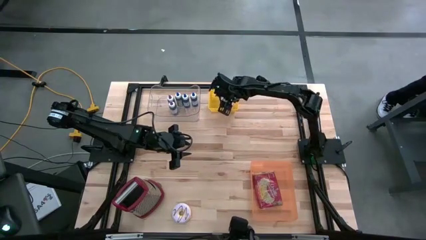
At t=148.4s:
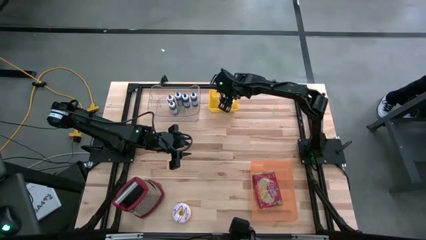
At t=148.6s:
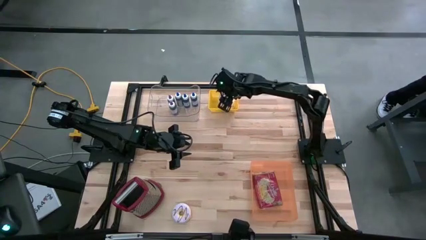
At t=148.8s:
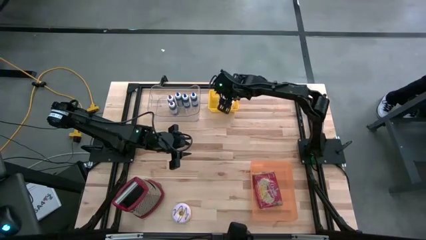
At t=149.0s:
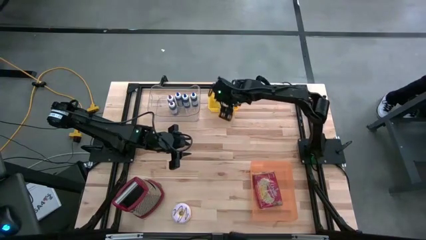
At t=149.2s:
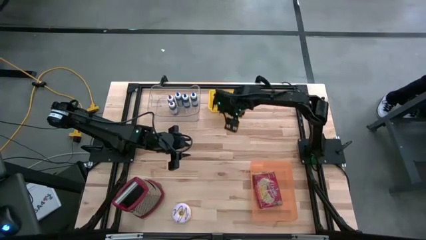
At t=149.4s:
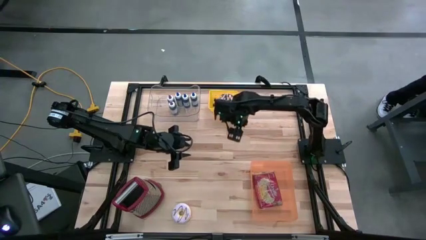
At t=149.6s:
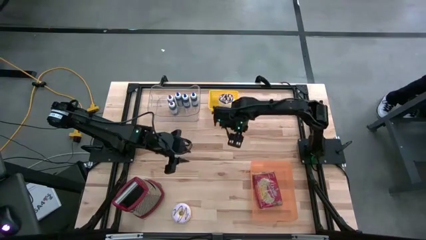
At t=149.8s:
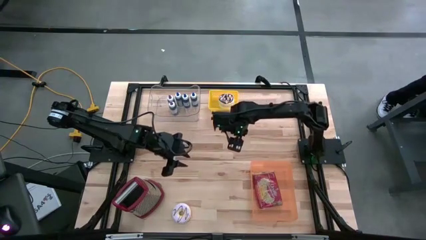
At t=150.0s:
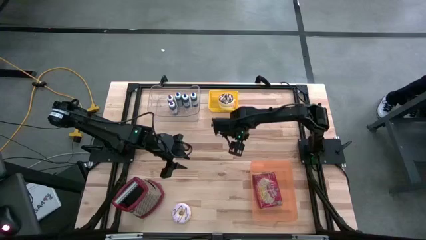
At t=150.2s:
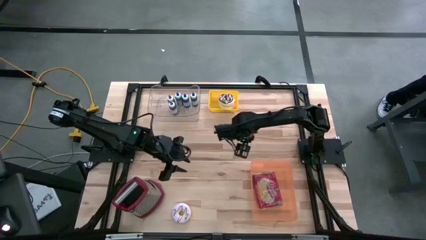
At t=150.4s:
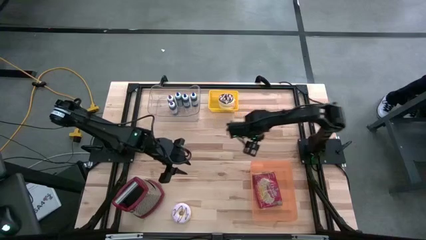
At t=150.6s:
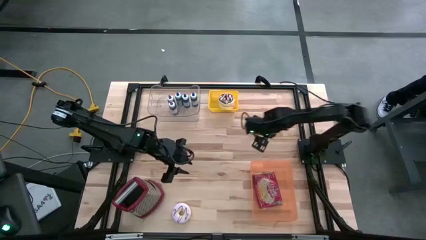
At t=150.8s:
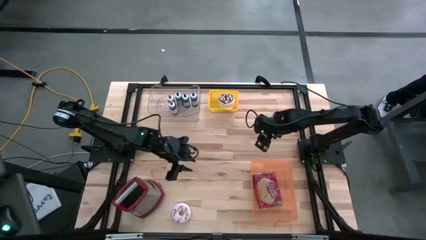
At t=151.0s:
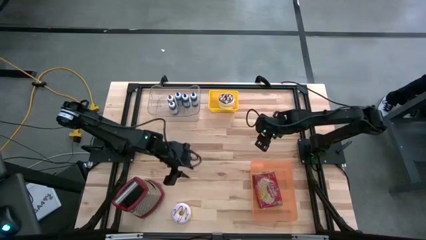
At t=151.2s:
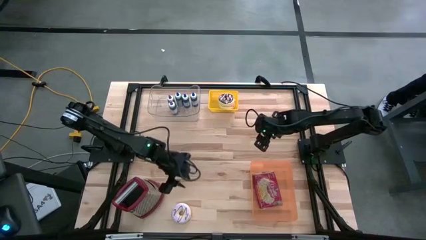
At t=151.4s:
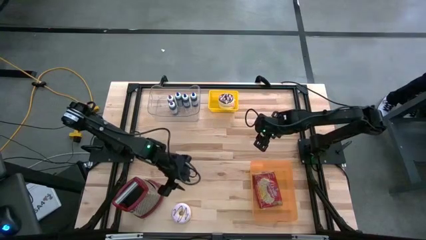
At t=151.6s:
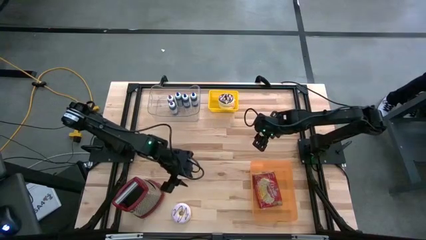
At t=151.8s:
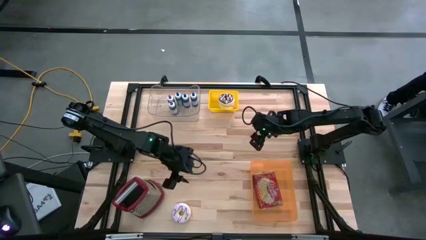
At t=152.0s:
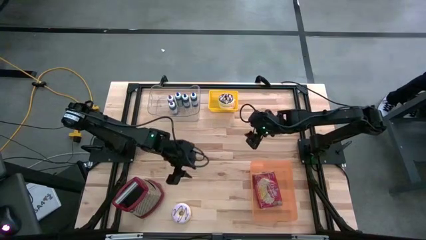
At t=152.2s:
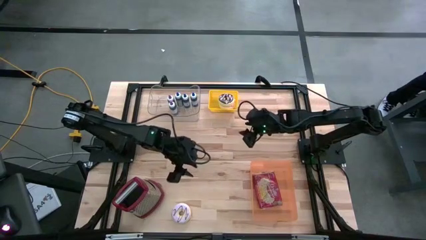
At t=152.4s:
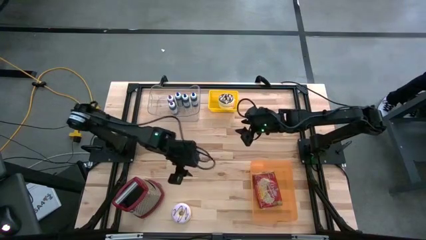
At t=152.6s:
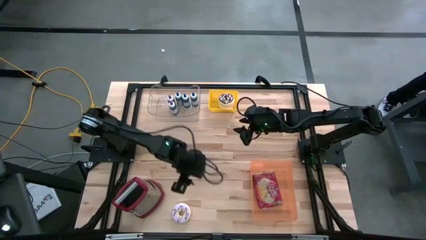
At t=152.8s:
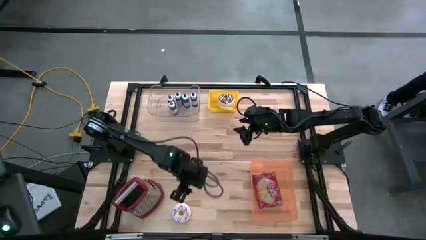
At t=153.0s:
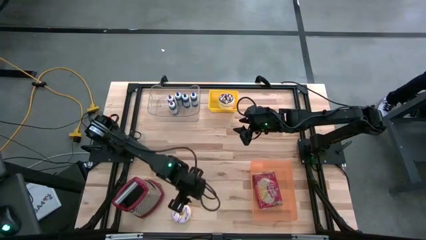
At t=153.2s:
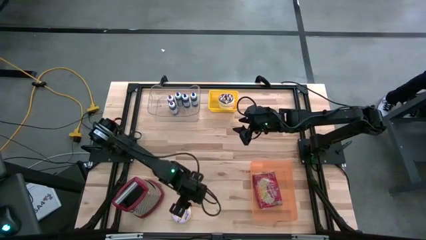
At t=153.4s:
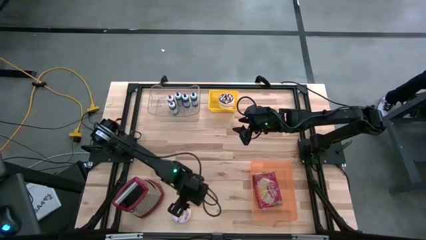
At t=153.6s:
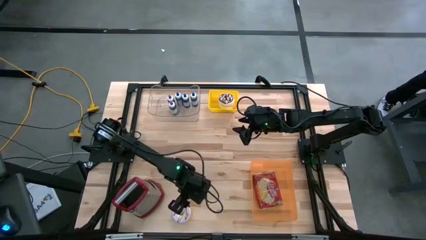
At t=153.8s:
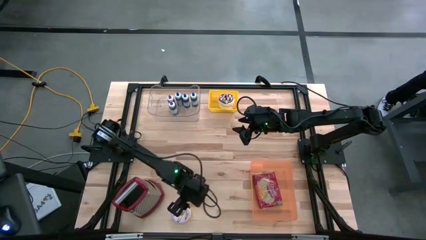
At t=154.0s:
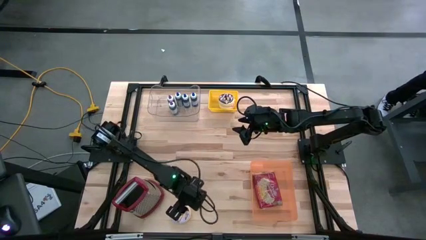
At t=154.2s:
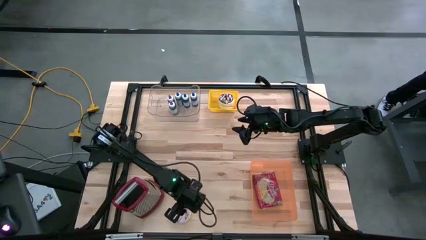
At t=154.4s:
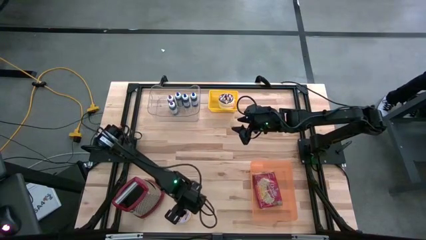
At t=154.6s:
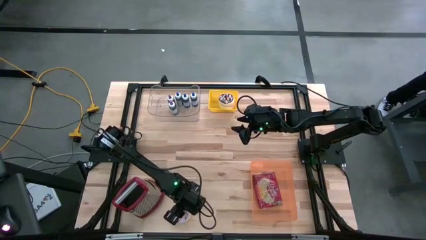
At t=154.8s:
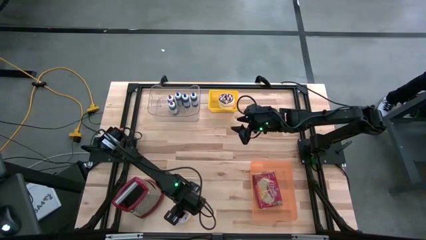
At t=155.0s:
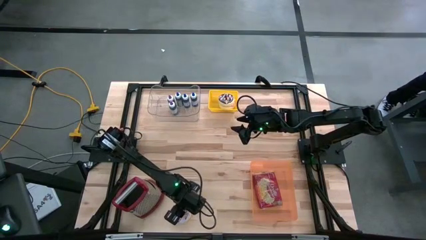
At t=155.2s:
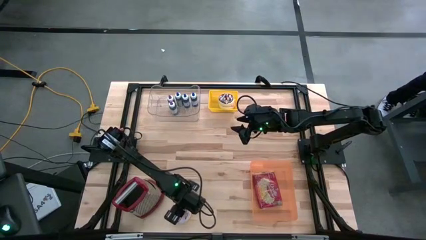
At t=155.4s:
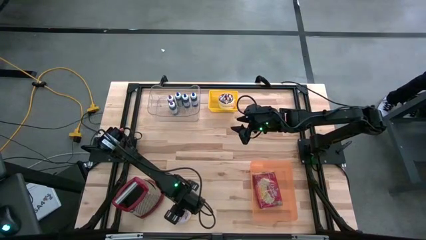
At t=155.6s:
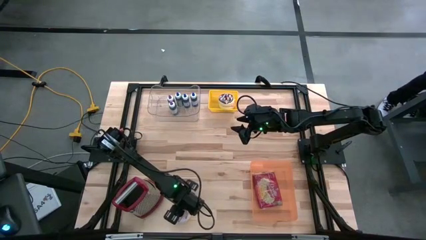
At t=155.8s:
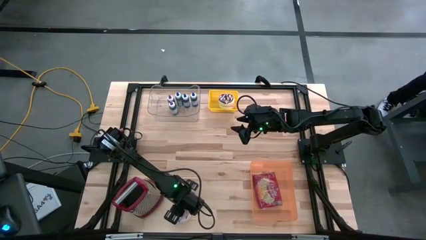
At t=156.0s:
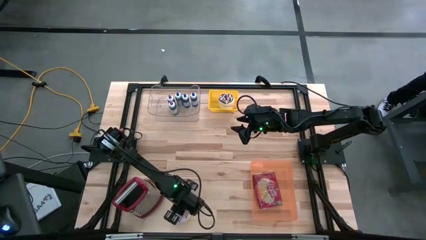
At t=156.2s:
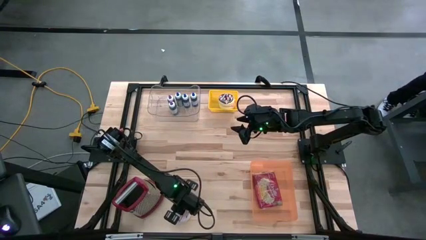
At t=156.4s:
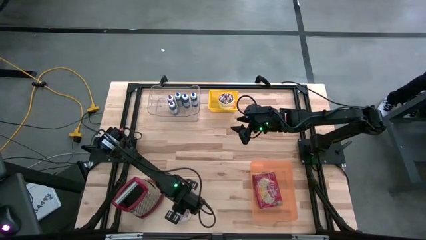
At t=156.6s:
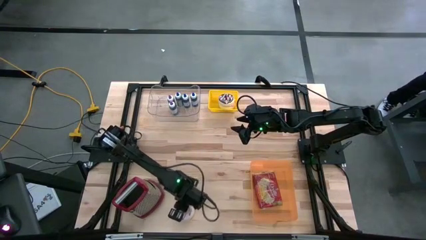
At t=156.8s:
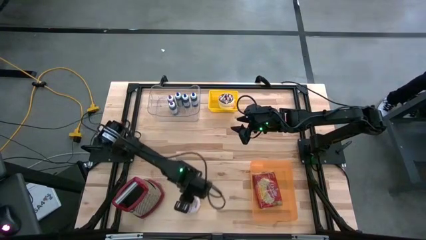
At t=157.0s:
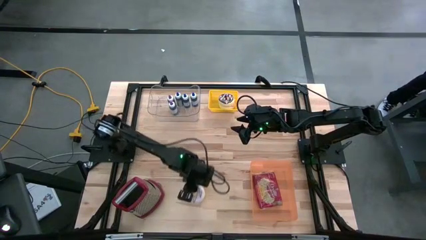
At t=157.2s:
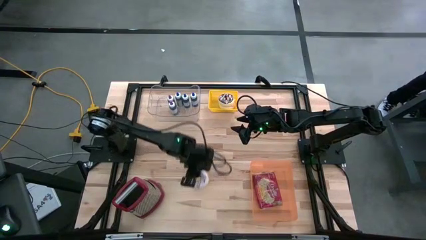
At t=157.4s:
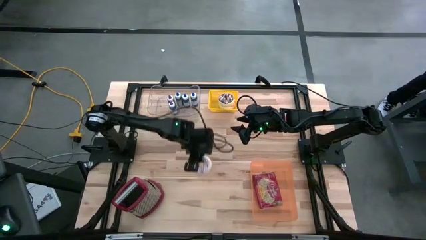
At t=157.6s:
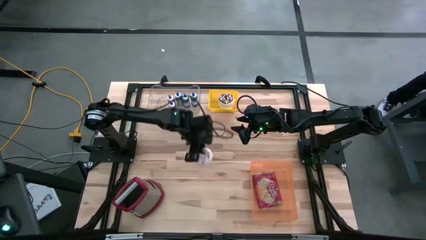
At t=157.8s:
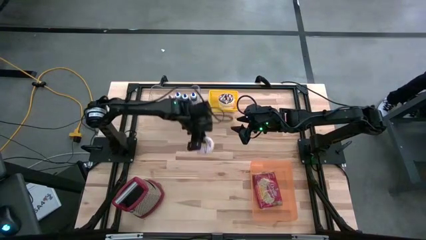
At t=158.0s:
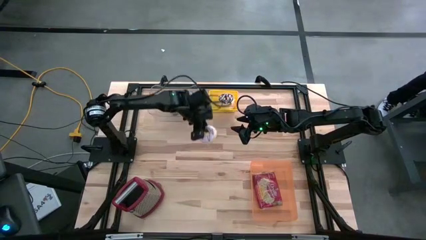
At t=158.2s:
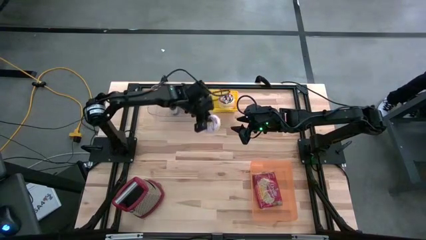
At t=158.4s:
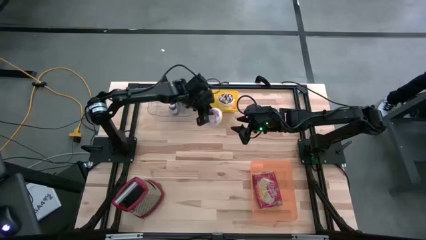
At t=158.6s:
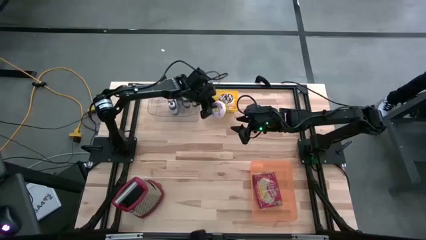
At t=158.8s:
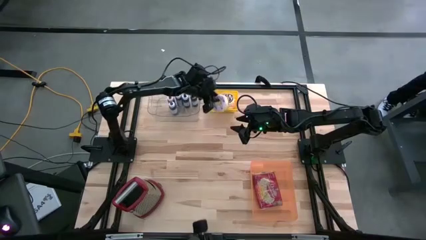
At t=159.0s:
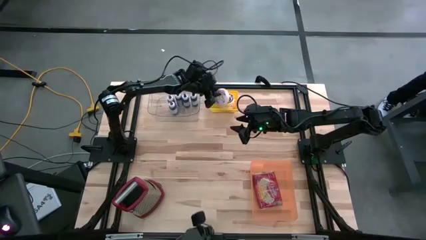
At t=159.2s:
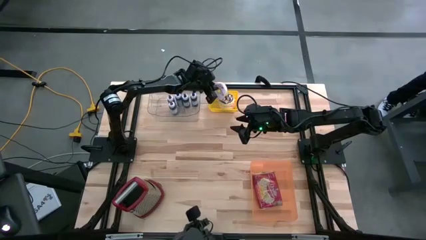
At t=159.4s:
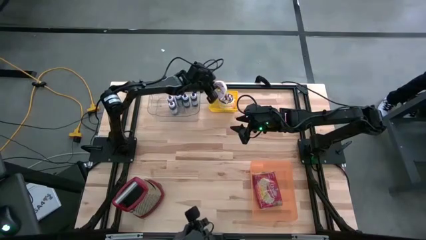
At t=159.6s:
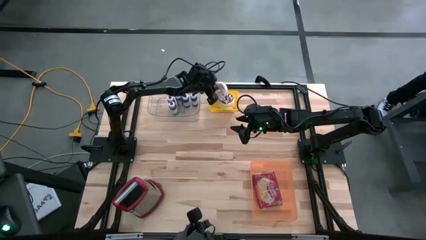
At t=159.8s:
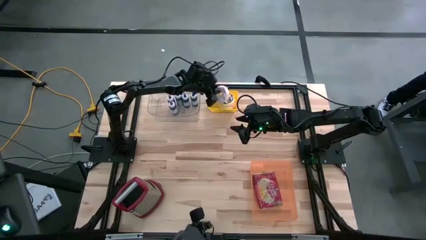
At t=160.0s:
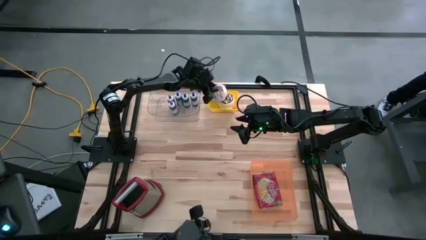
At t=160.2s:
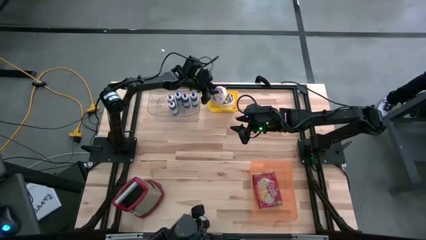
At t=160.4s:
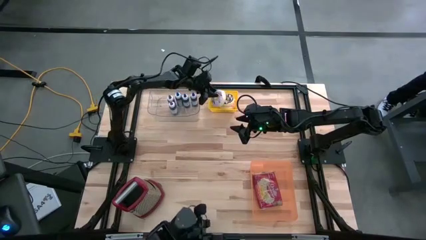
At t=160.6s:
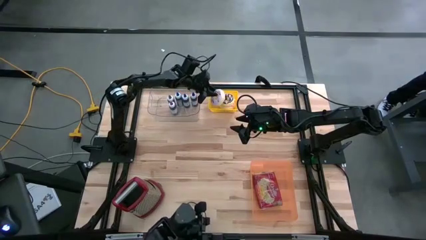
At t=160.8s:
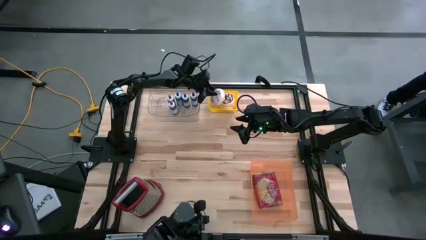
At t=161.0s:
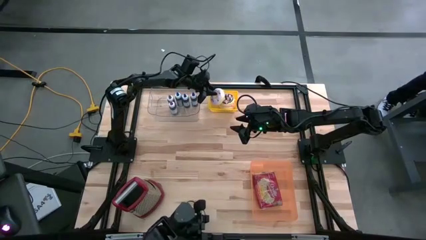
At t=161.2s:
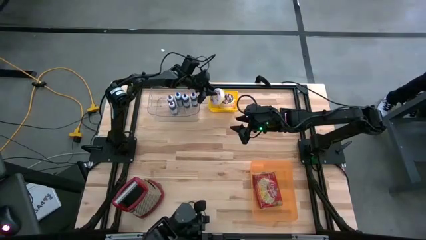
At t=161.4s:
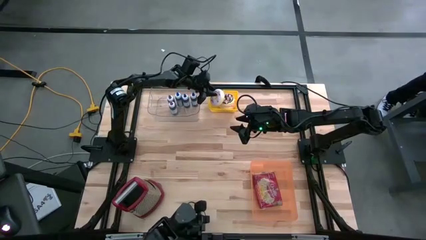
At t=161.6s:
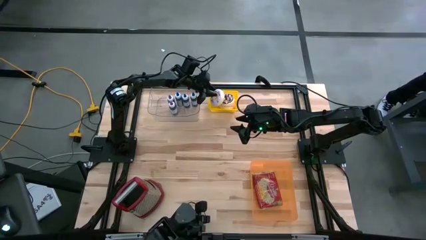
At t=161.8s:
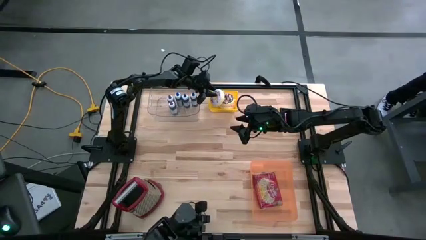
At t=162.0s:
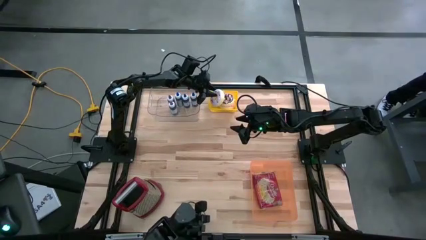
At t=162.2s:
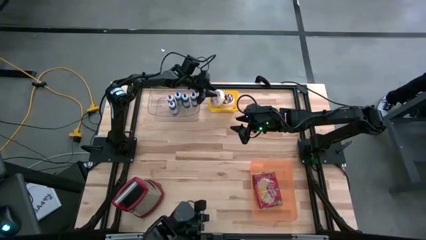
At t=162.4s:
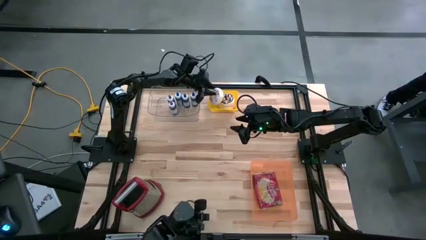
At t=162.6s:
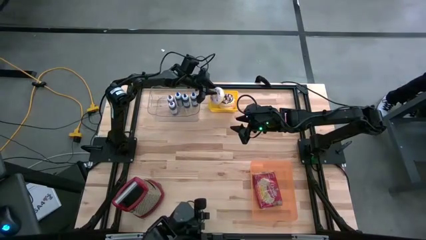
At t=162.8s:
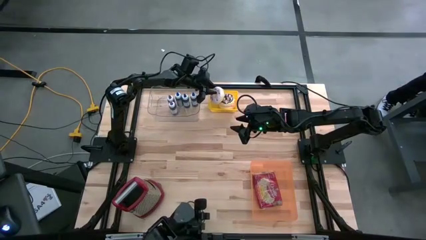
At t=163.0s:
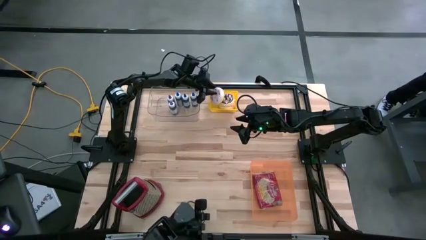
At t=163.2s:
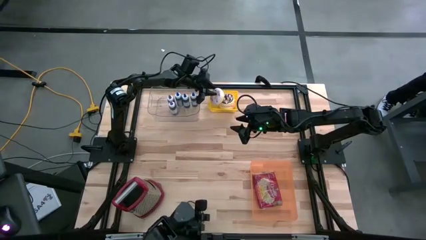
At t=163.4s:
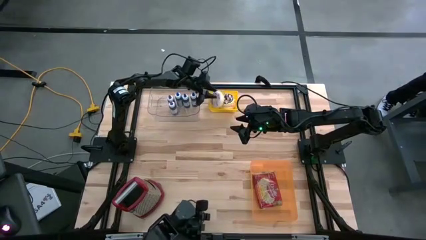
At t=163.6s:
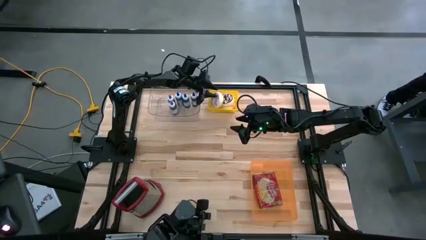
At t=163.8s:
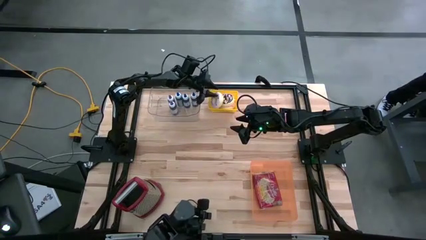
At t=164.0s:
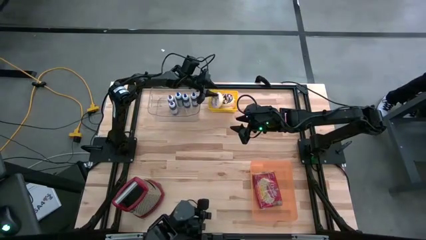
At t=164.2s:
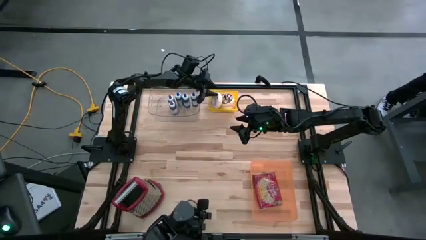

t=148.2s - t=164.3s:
Put the purple donut into the yellow bin
